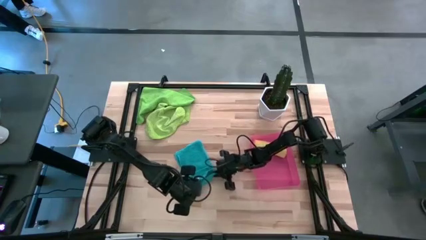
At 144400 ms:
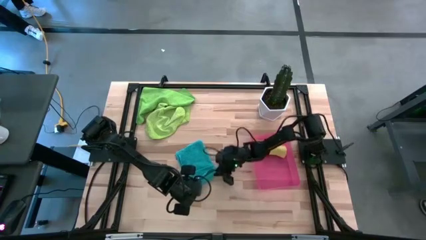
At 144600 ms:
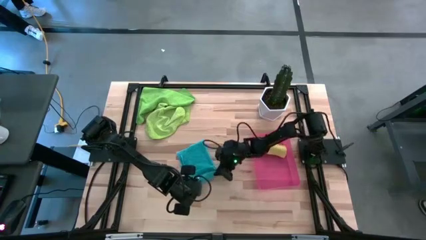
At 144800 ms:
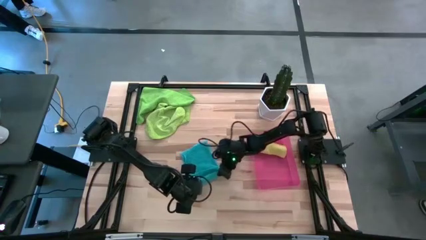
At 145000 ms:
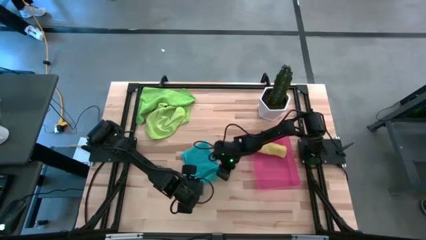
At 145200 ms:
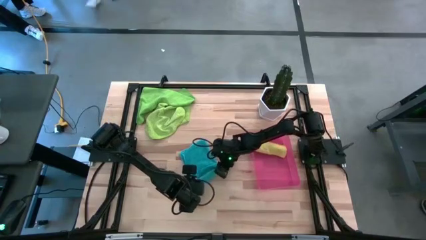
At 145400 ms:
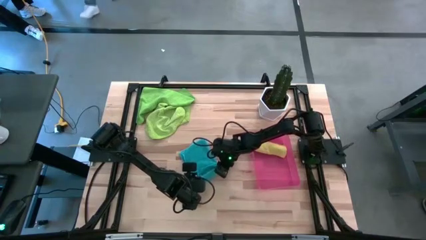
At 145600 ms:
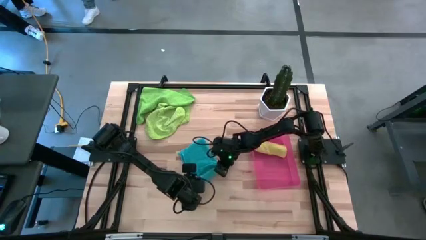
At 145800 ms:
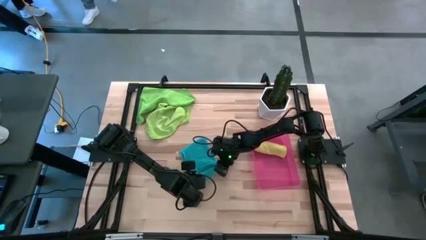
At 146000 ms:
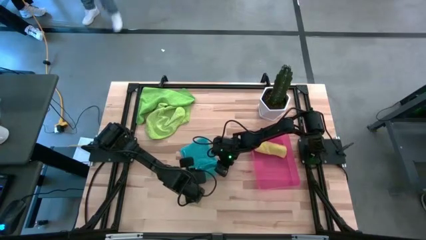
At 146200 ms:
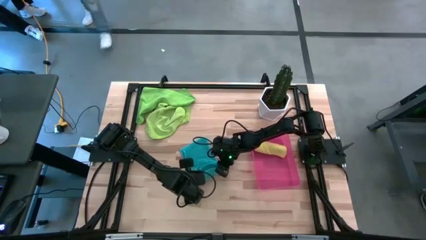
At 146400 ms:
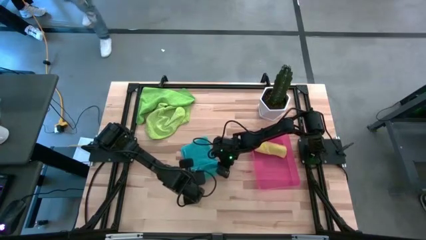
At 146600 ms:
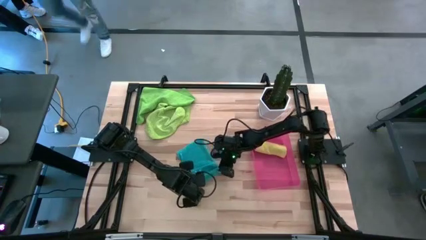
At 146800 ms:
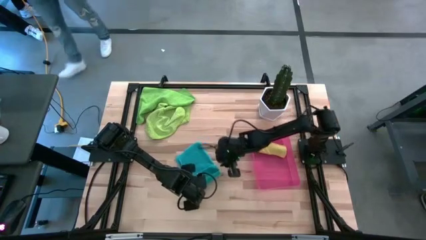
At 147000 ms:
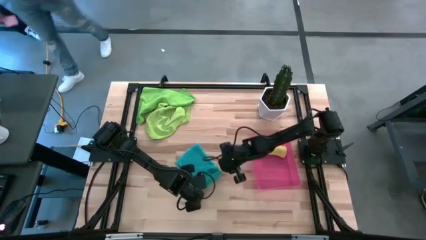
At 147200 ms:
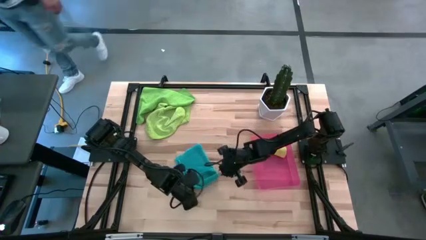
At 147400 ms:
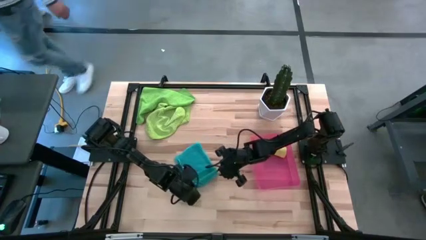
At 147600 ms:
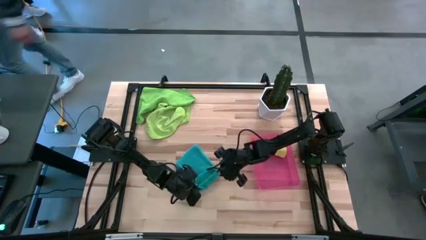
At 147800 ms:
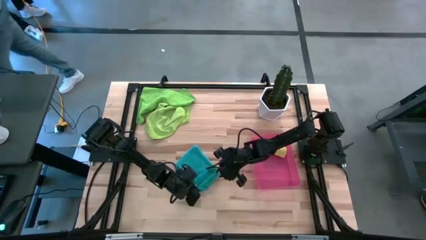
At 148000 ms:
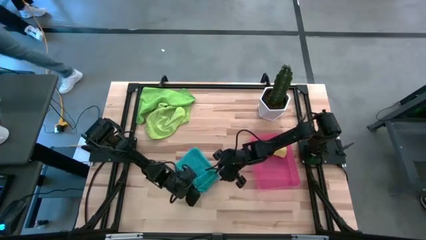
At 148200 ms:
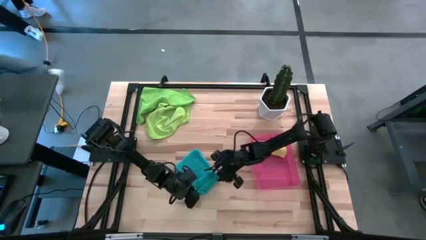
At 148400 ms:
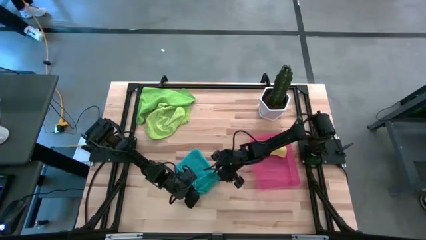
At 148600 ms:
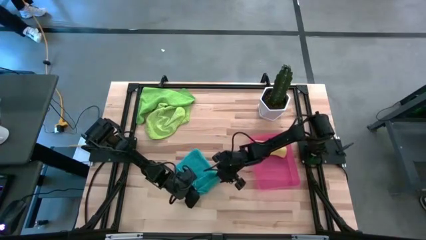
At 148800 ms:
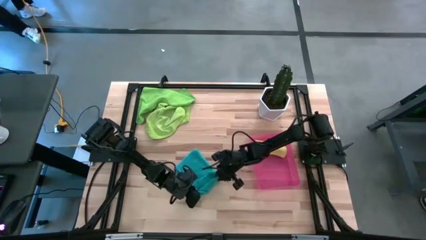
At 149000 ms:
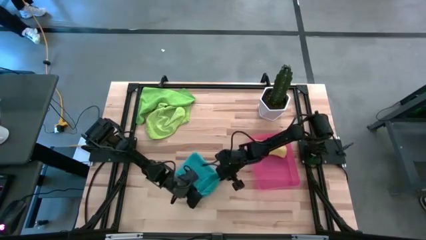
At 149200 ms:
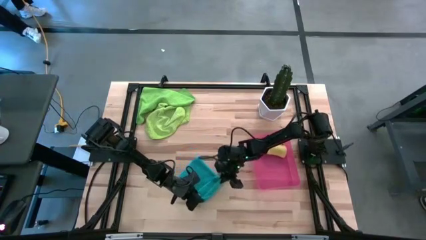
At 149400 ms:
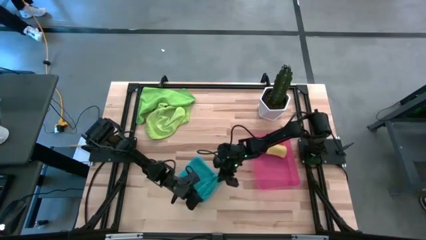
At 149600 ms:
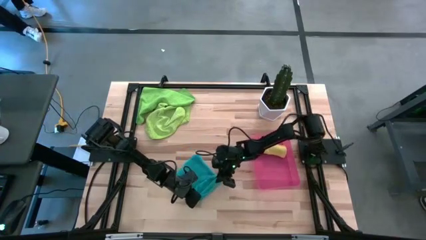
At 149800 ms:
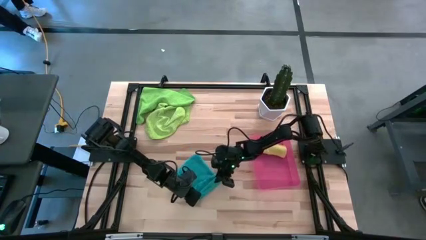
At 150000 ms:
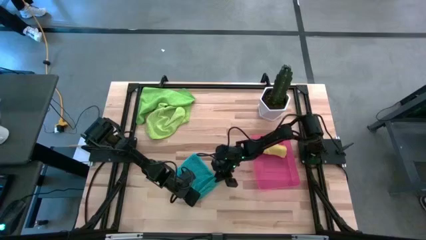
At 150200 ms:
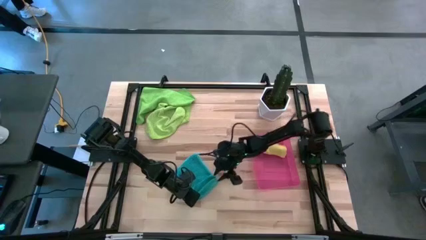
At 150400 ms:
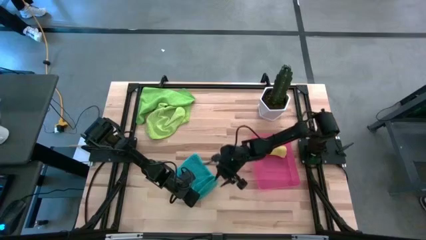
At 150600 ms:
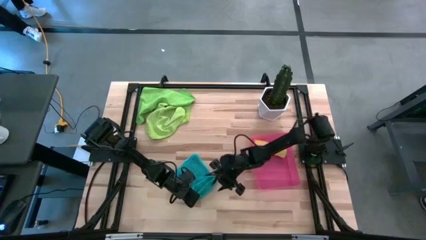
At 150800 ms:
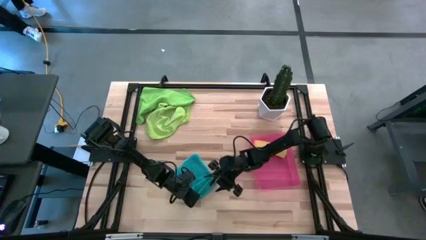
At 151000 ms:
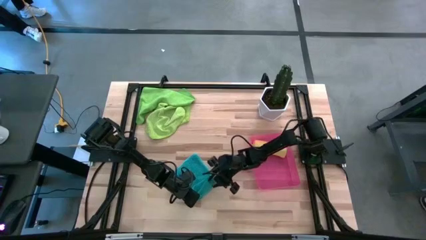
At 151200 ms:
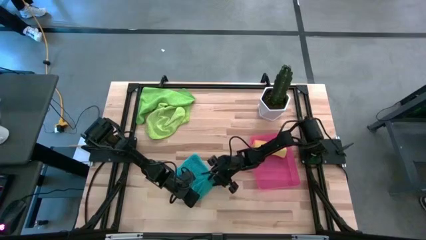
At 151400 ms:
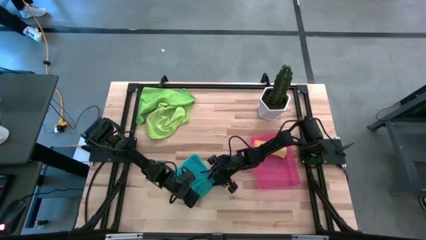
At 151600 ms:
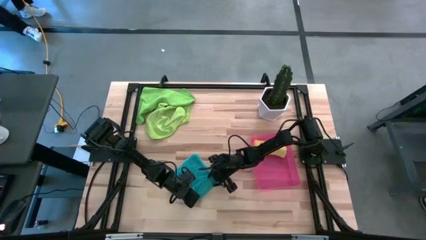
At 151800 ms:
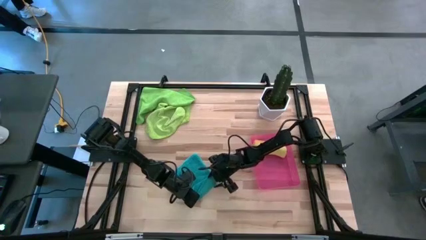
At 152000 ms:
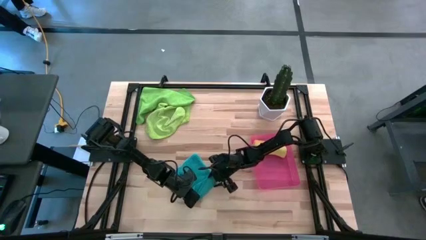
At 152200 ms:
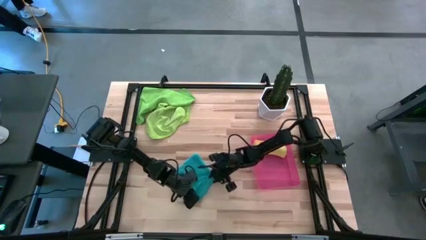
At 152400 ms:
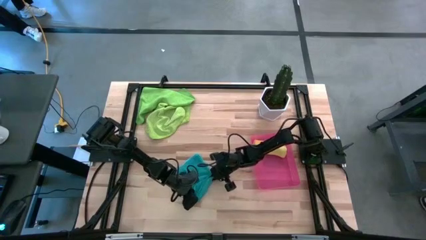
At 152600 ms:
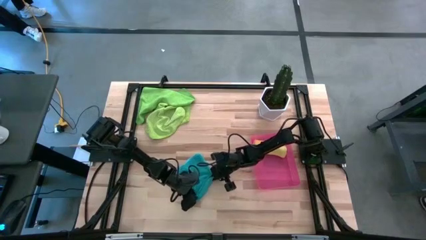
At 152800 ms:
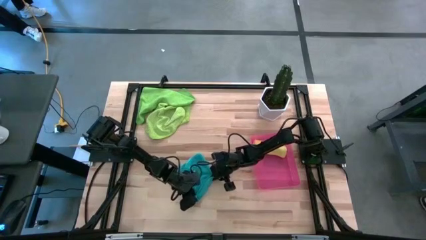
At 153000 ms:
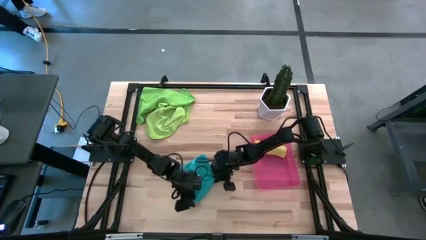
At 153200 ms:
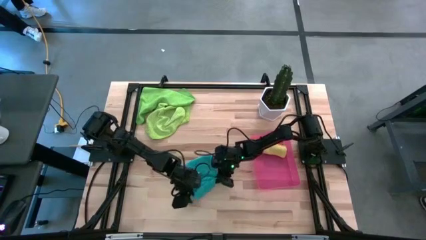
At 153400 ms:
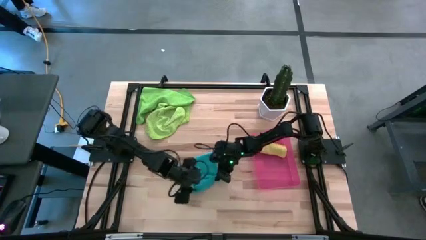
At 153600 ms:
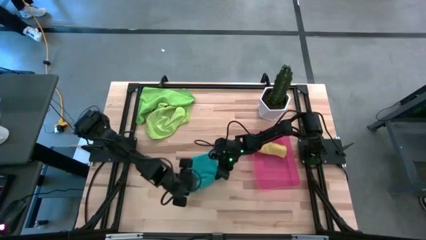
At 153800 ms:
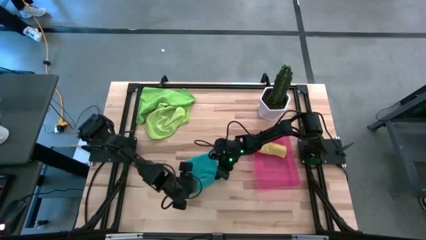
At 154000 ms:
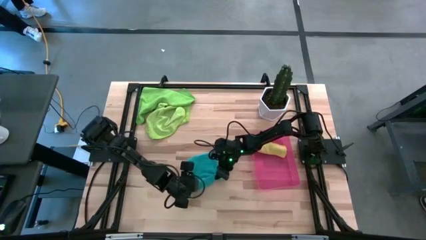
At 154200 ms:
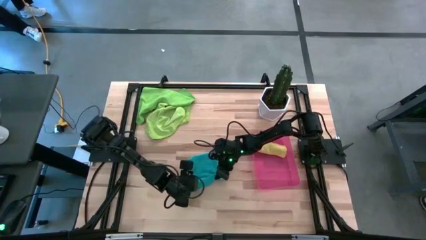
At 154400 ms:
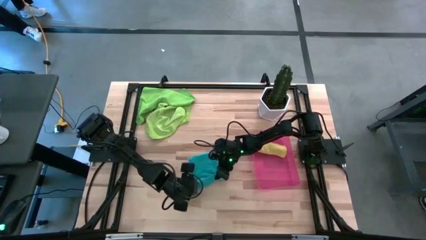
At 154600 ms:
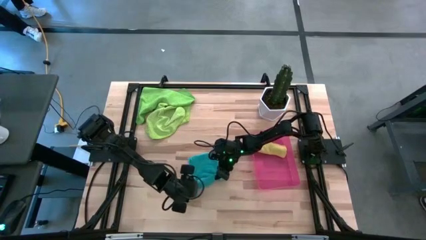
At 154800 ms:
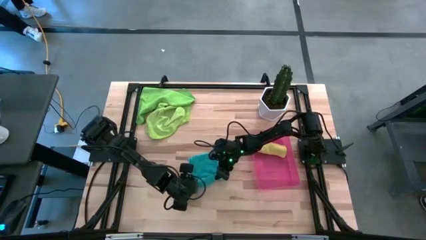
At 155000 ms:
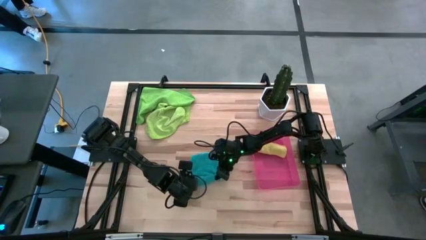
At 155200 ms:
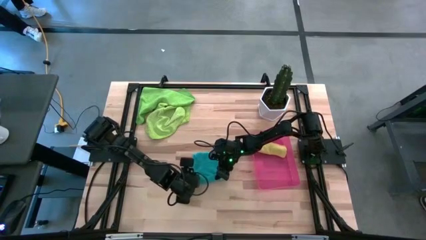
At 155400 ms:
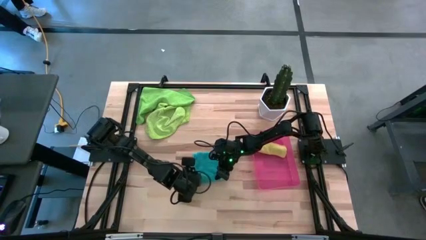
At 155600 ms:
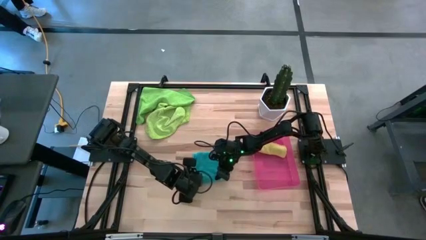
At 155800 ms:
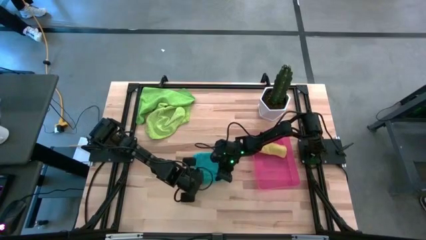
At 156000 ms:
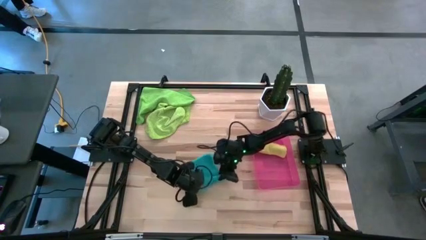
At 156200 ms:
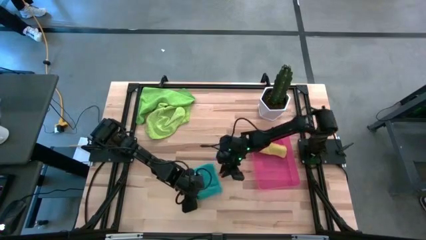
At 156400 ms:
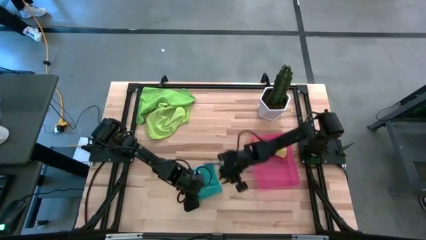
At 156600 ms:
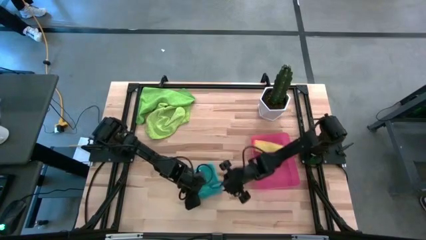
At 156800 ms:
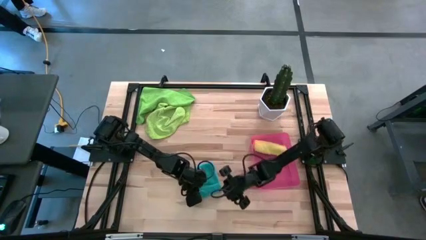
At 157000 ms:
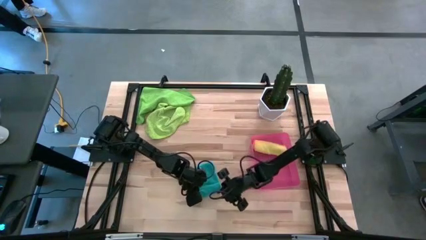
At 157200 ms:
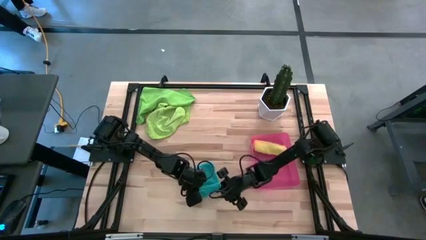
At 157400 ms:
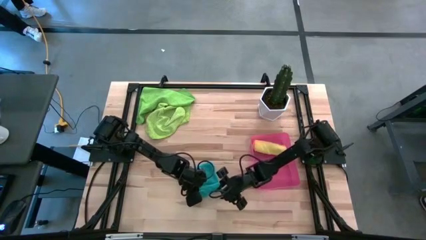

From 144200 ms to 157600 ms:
Task: Roll microfiber towels into tight, uniform cylinder then place into a basket
Roll the blue microfiber towel
